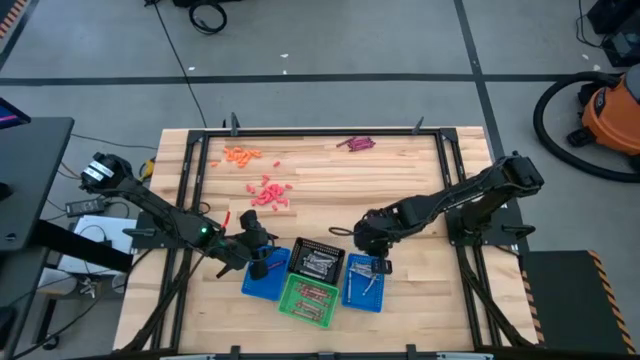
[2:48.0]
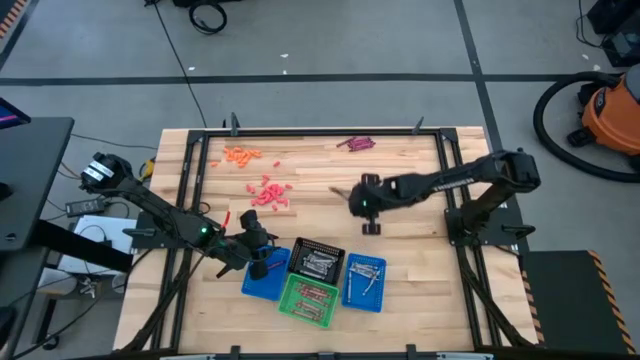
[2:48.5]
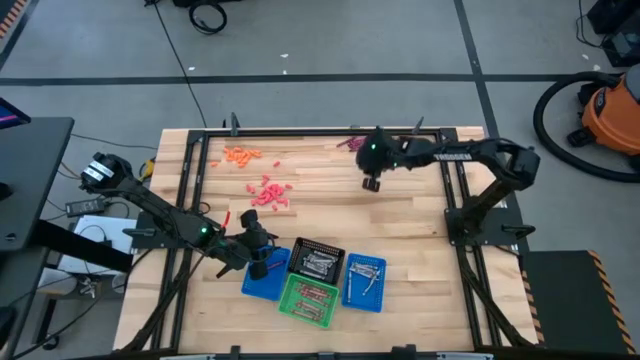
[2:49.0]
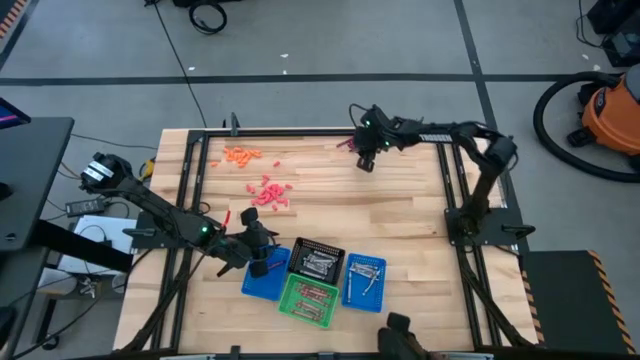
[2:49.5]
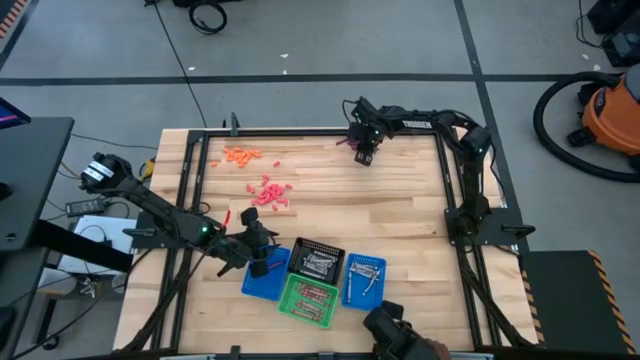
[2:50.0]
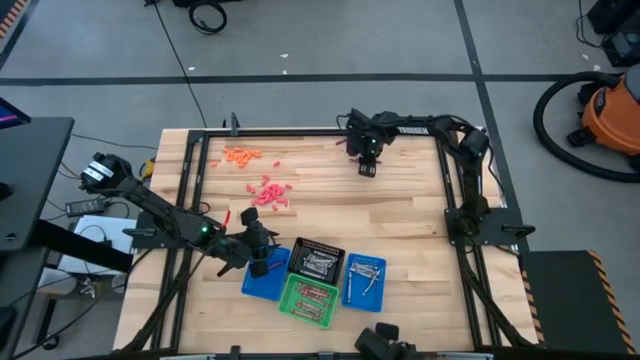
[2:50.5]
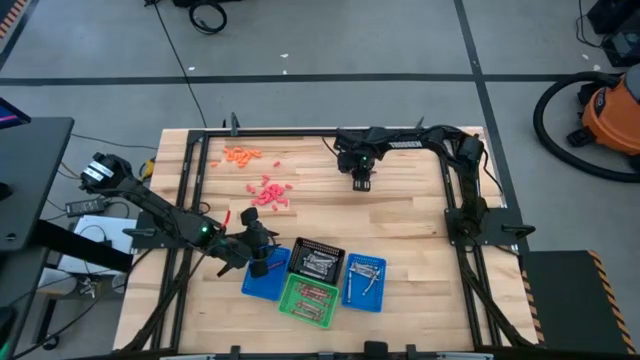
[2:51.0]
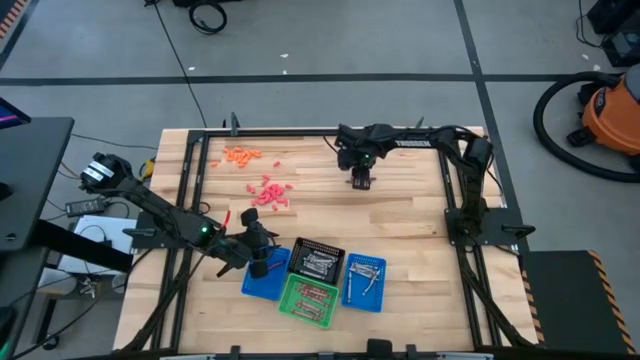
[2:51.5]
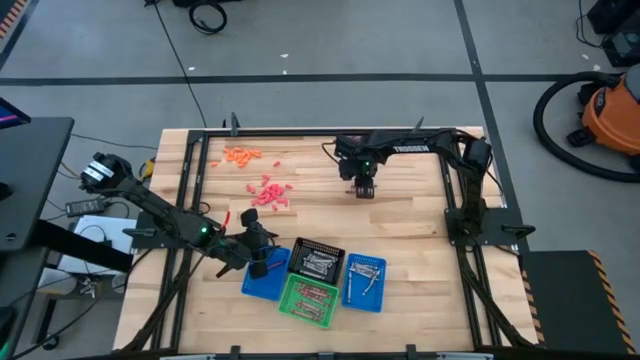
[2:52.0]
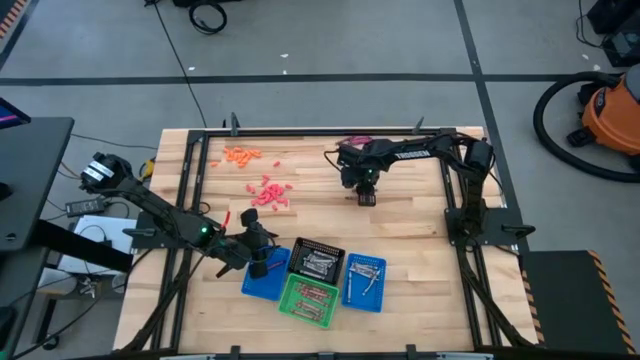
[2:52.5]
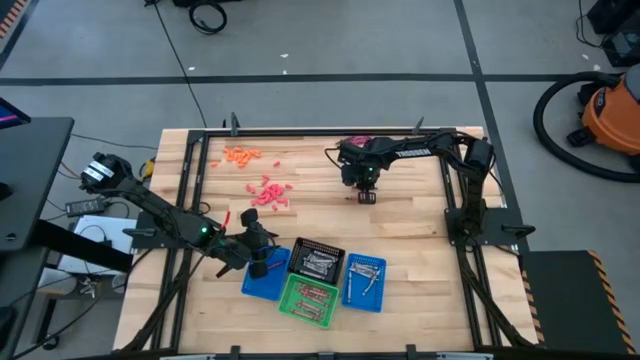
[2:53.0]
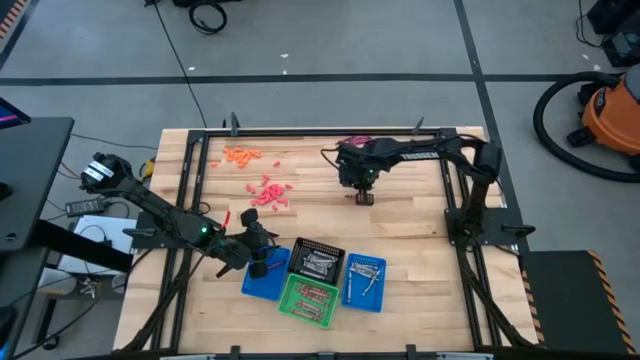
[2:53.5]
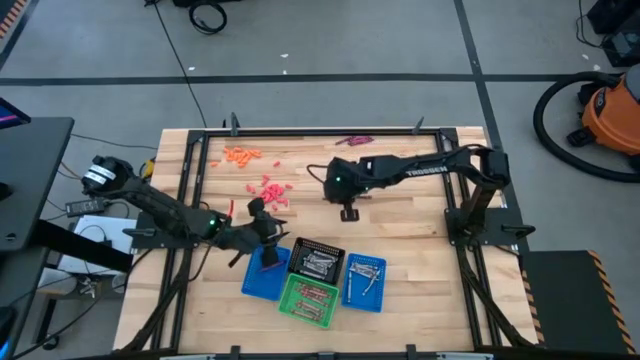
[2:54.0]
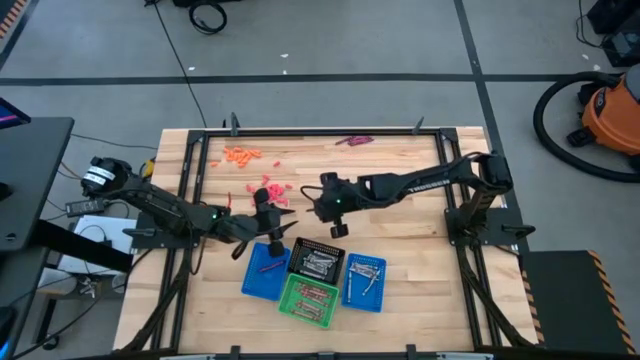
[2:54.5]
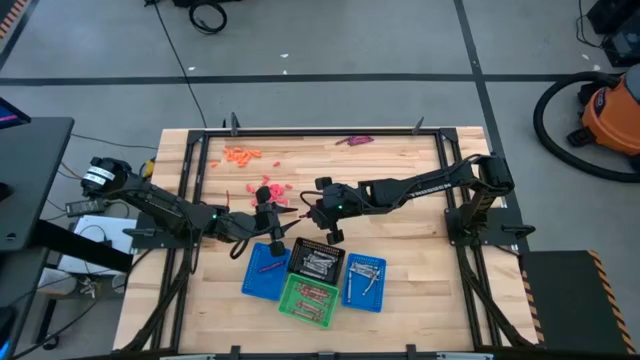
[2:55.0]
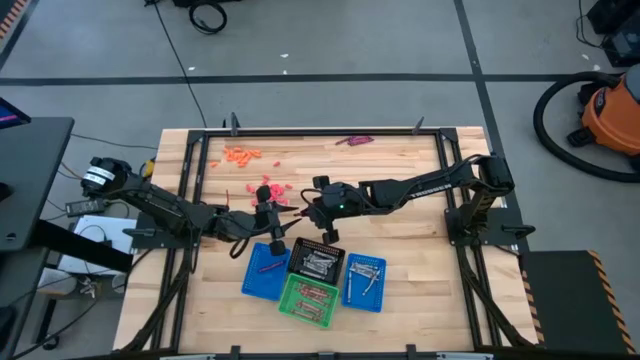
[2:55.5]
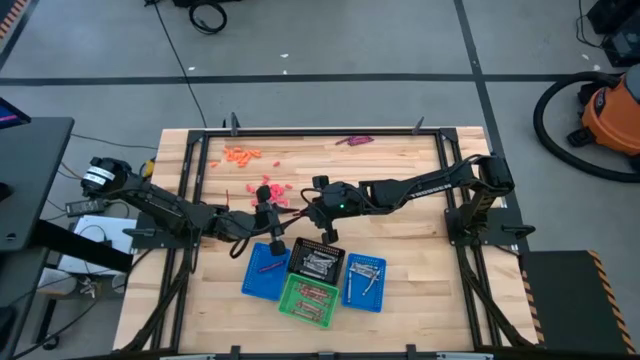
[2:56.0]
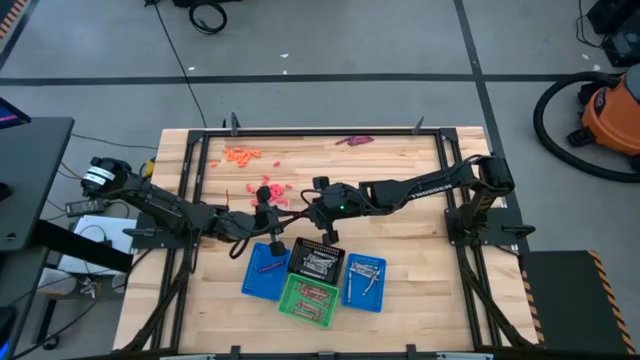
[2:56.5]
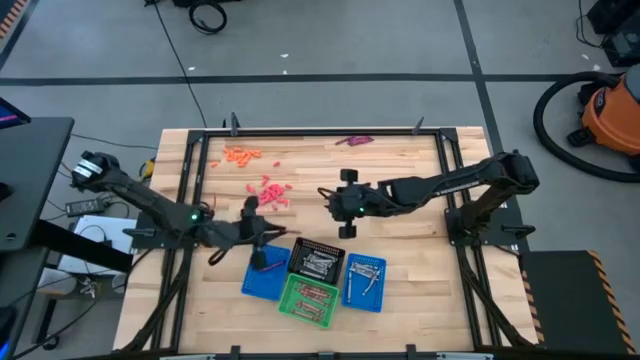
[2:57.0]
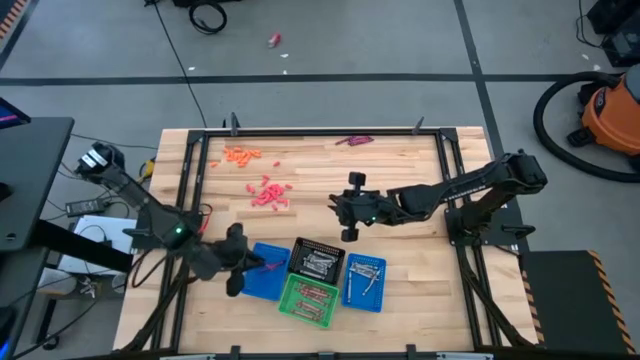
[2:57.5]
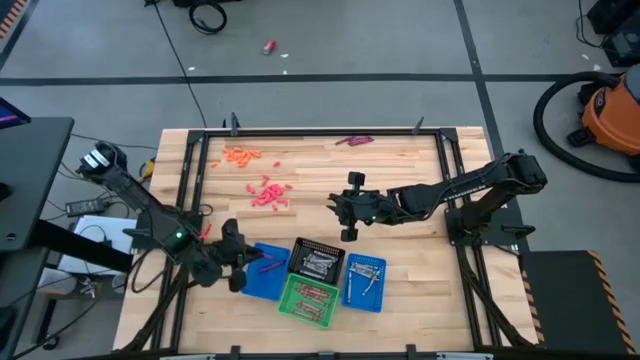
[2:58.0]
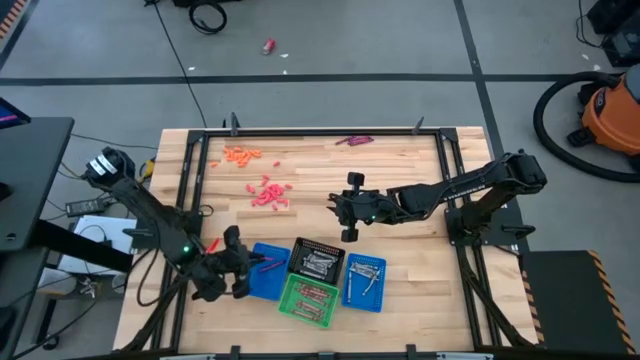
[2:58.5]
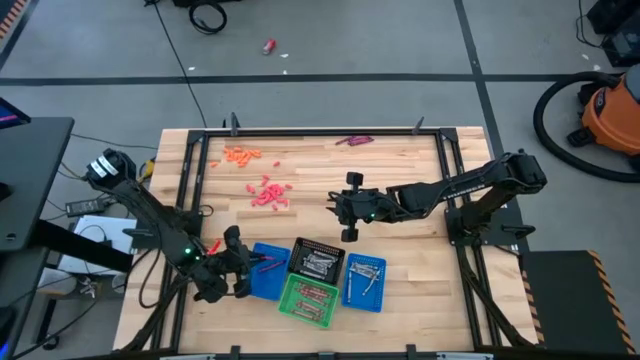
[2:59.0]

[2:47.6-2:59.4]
Task: Sort crayons
Put the dark red crayon into the left blue bin

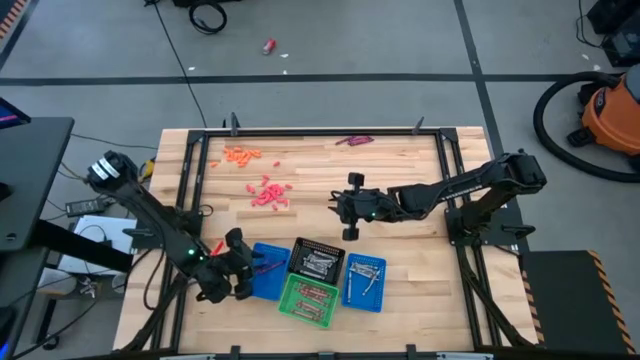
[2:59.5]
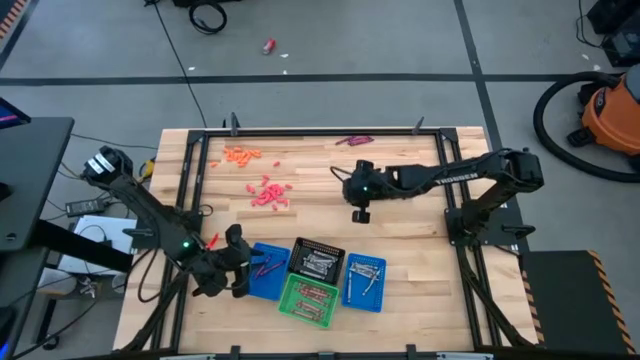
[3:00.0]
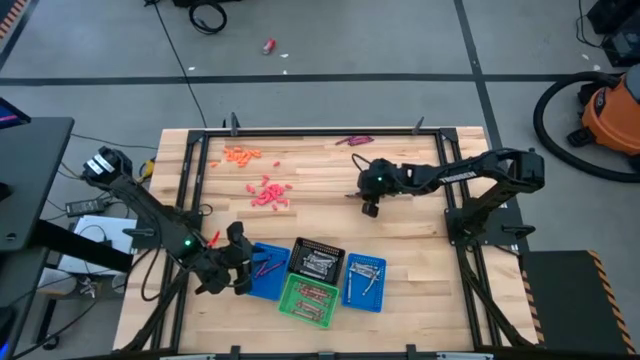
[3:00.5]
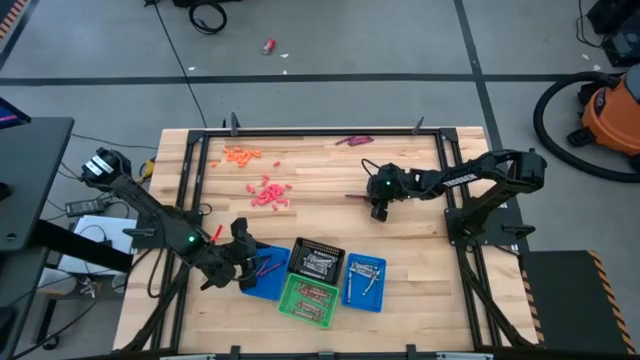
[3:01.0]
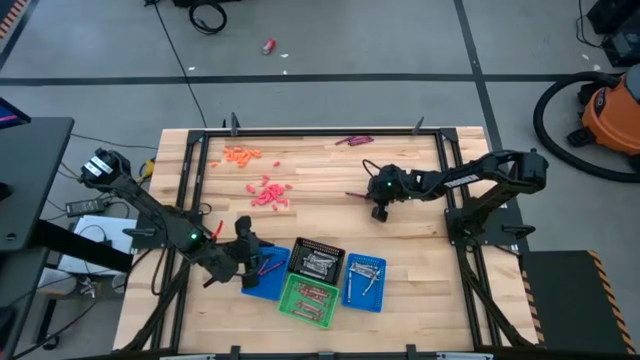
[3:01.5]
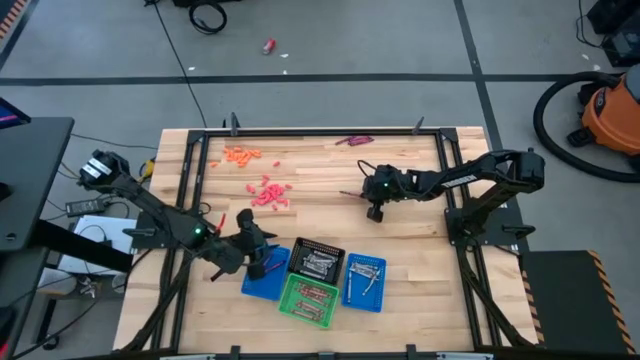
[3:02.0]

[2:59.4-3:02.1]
Put the dark red crayon into the left blue bin

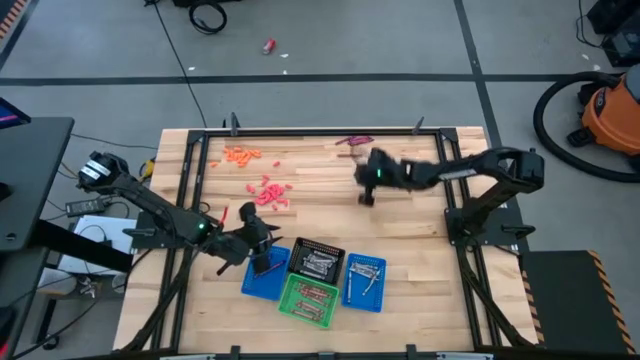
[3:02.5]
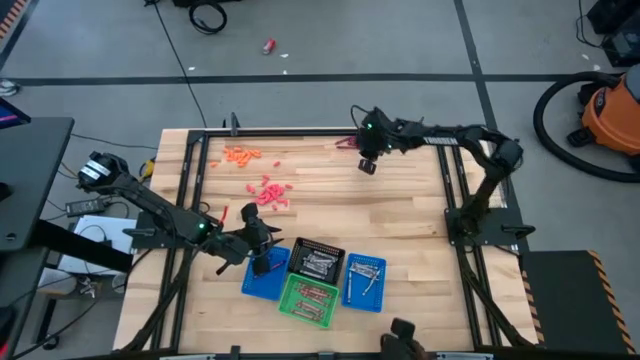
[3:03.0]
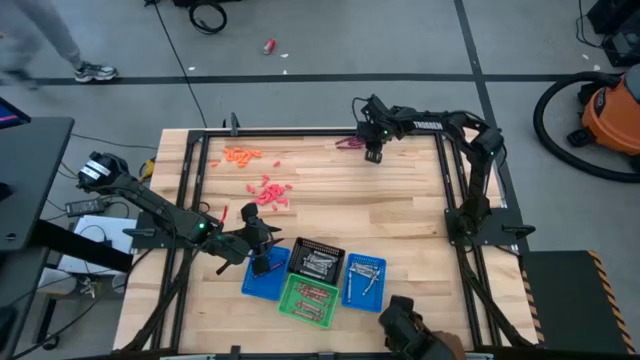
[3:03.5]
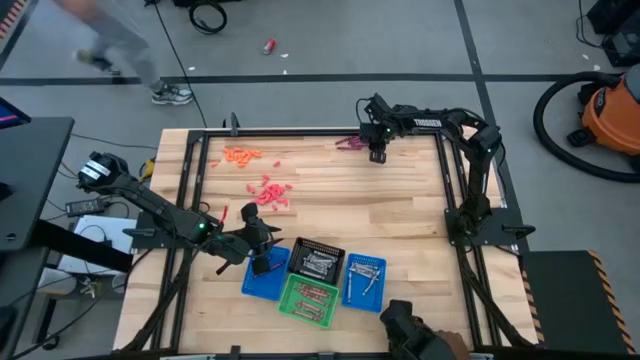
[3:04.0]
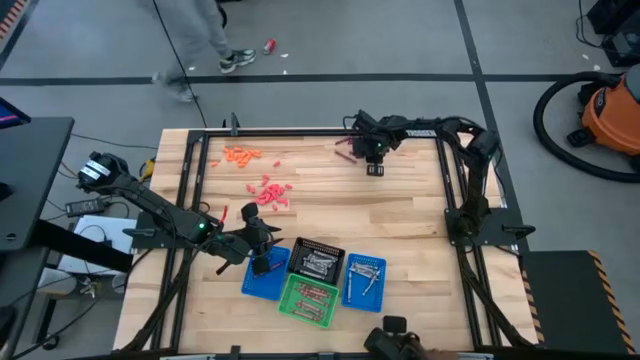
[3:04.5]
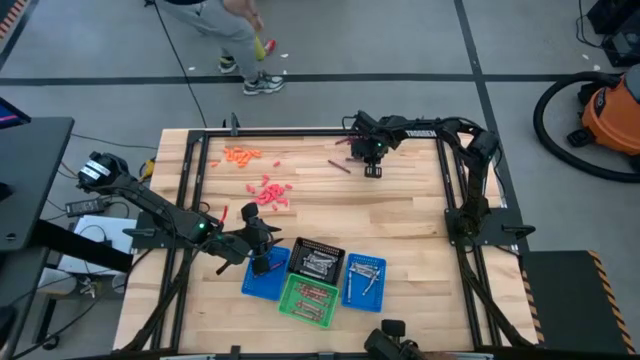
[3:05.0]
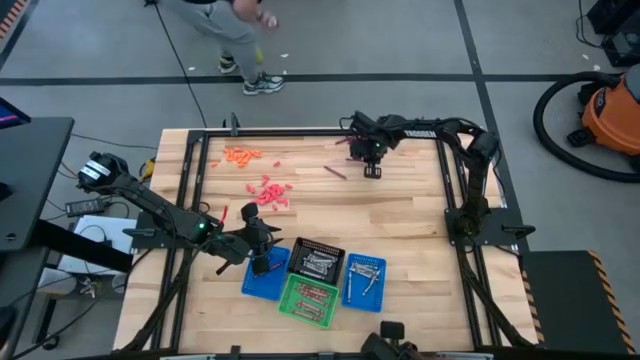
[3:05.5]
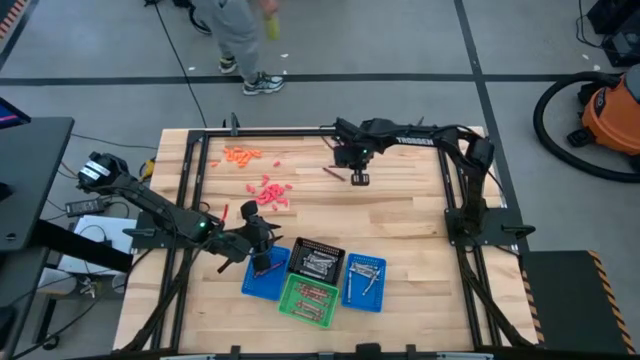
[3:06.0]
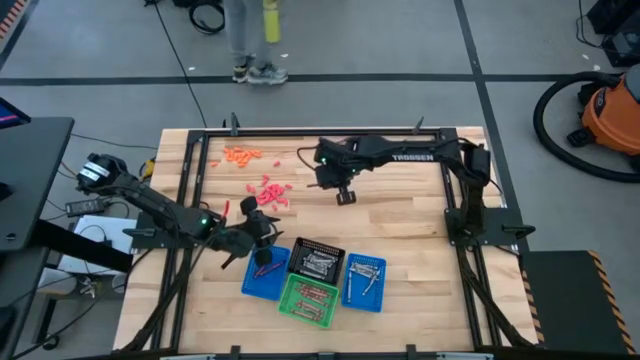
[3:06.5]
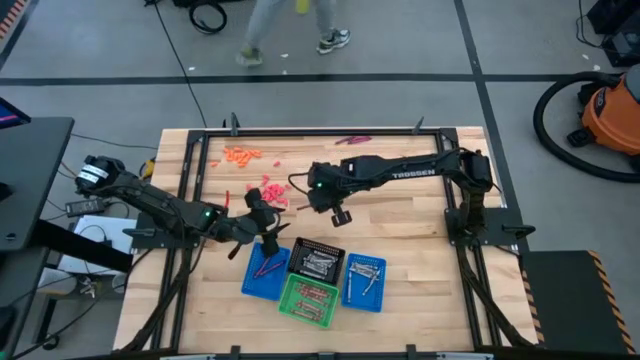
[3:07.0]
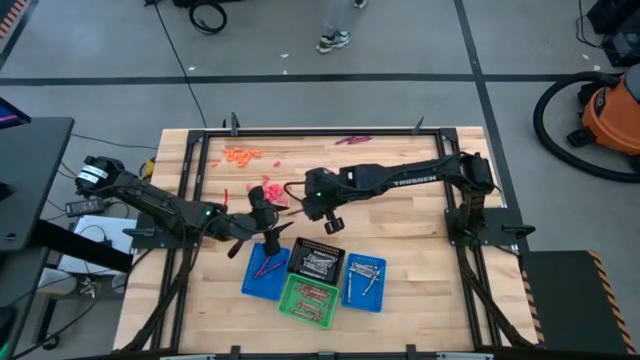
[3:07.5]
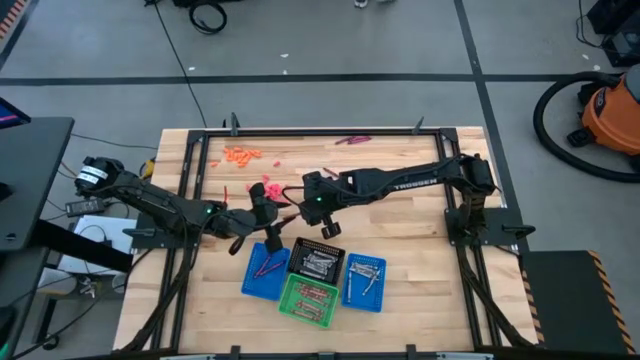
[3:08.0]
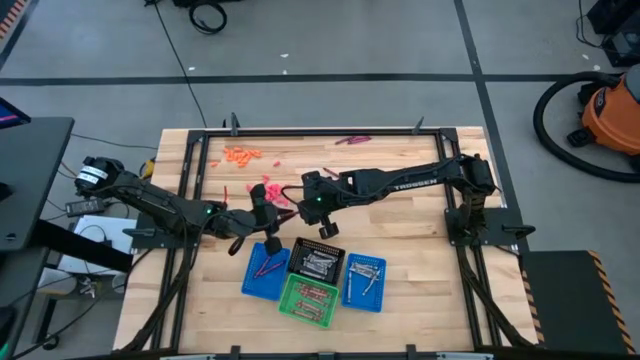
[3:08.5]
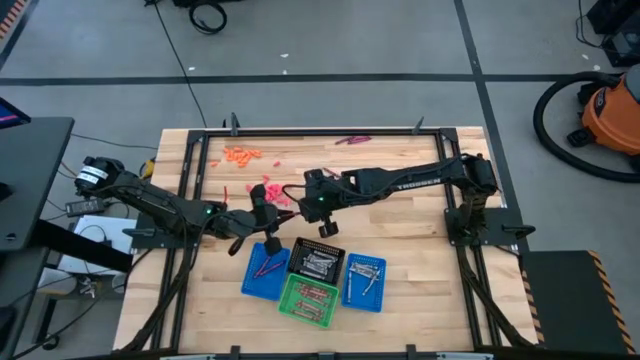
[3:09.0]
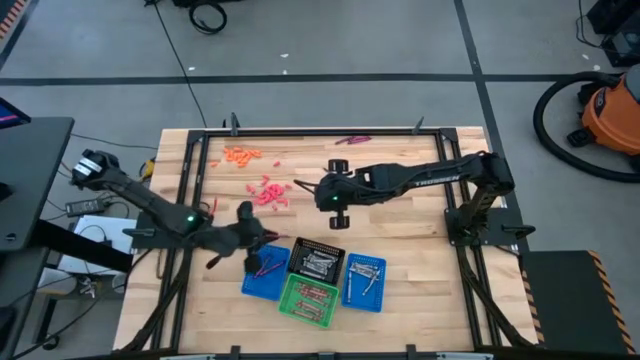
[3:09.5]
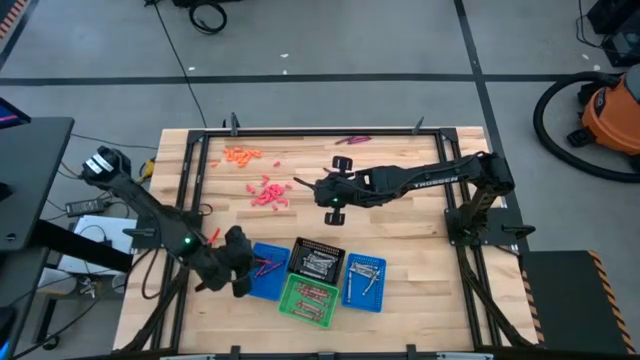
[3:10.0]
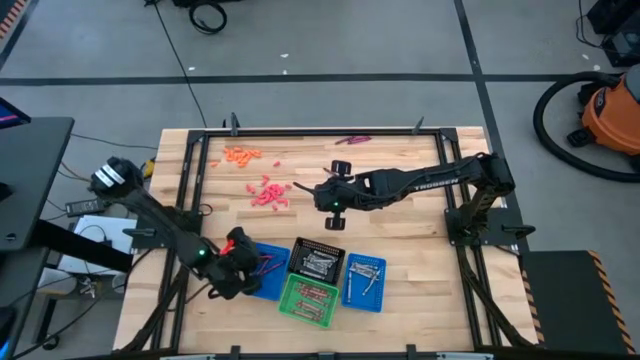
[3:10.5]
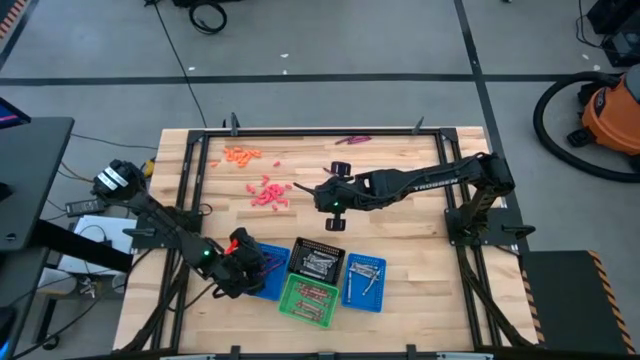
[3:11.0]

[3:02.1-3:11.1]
Put the dark red crayon into the left blue bin
